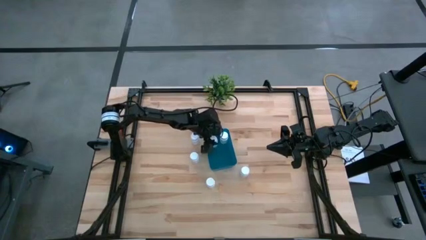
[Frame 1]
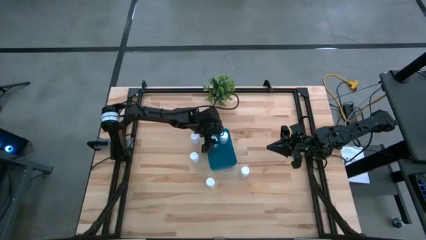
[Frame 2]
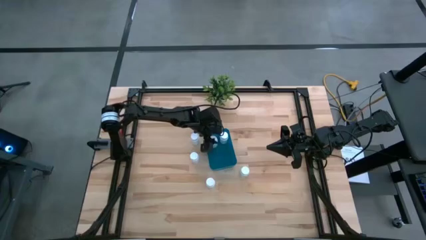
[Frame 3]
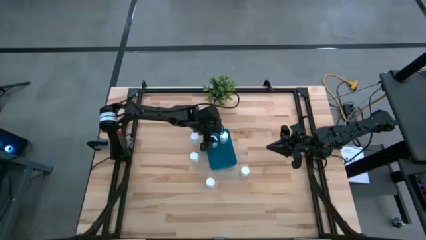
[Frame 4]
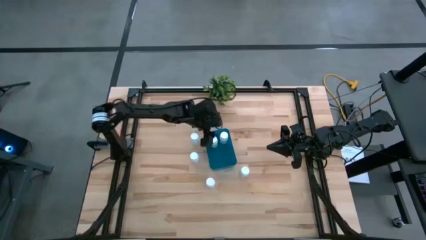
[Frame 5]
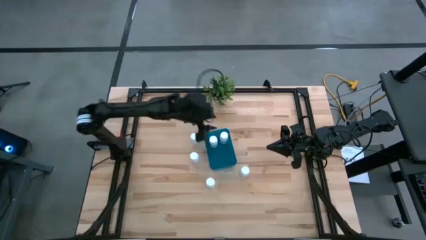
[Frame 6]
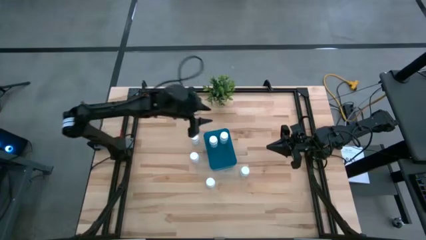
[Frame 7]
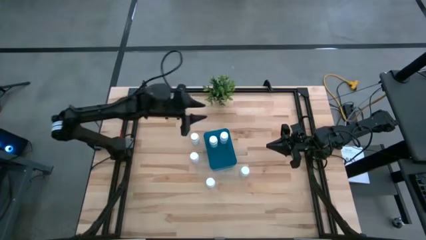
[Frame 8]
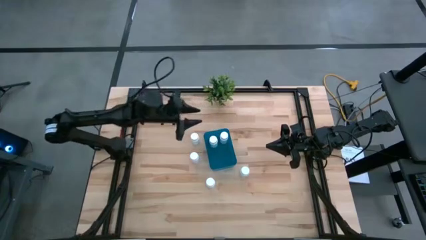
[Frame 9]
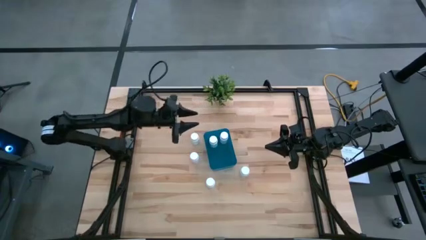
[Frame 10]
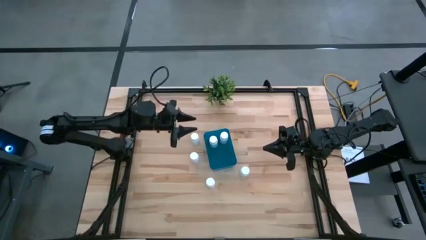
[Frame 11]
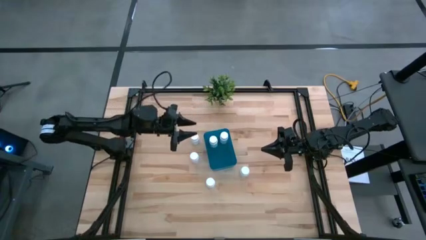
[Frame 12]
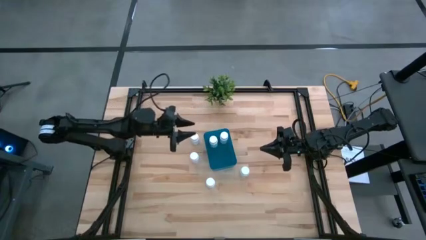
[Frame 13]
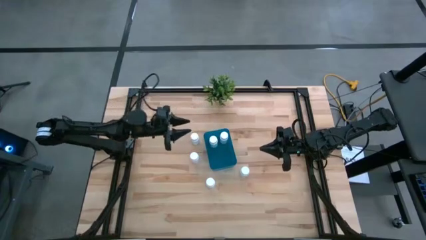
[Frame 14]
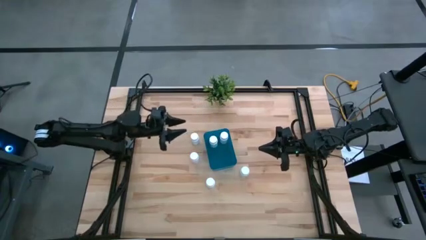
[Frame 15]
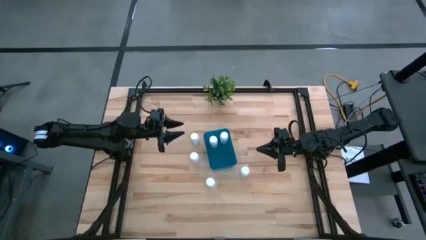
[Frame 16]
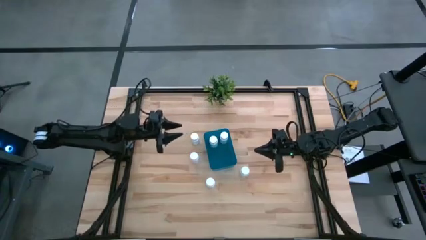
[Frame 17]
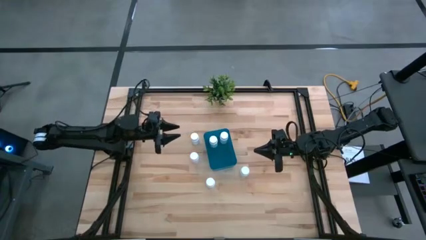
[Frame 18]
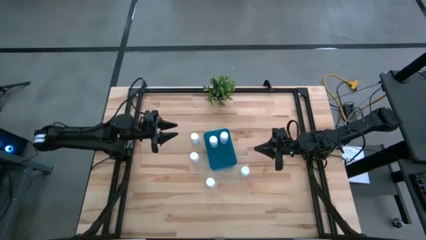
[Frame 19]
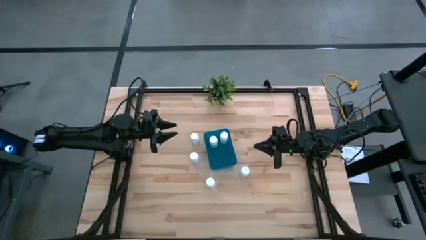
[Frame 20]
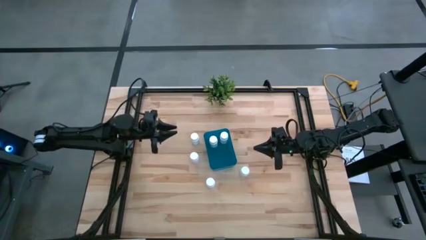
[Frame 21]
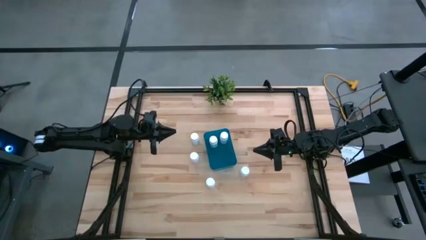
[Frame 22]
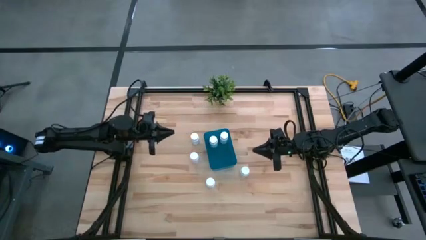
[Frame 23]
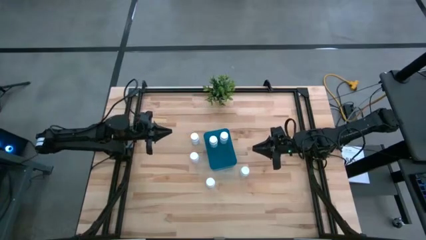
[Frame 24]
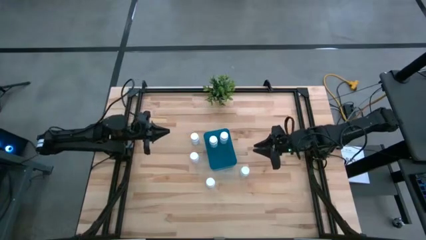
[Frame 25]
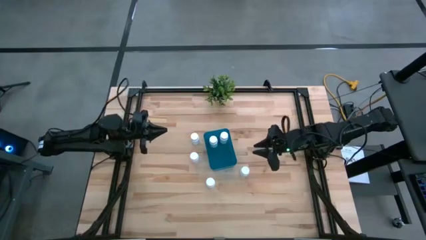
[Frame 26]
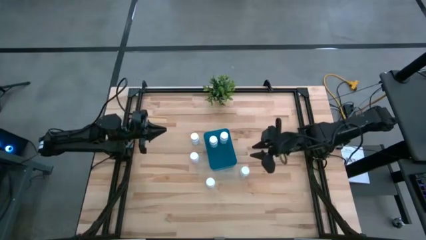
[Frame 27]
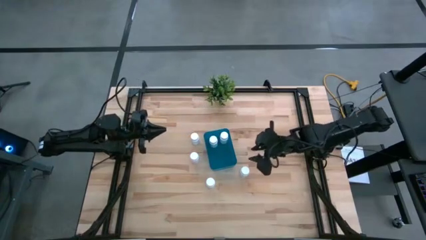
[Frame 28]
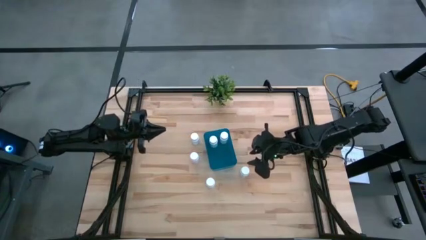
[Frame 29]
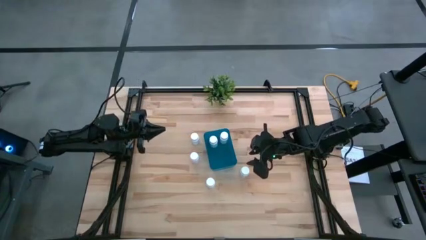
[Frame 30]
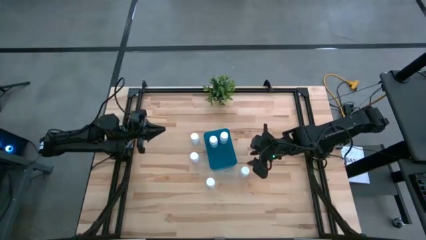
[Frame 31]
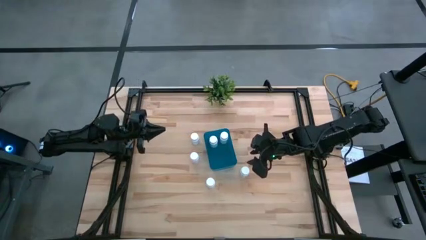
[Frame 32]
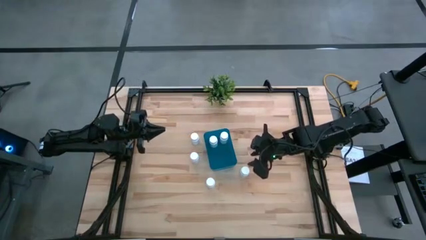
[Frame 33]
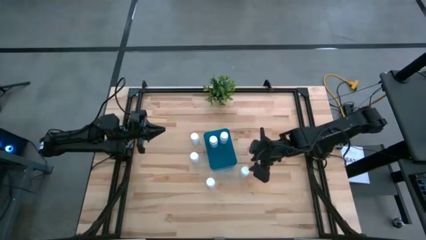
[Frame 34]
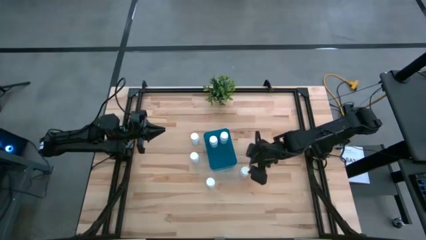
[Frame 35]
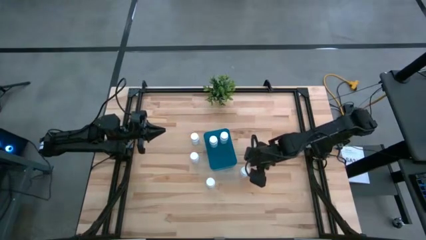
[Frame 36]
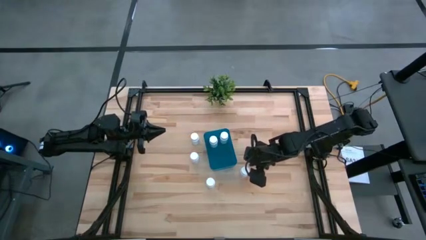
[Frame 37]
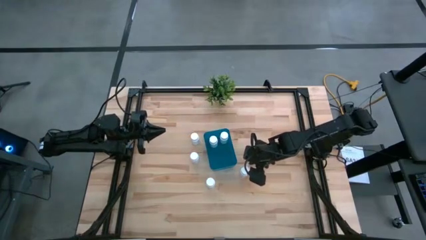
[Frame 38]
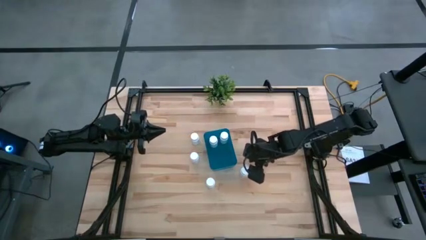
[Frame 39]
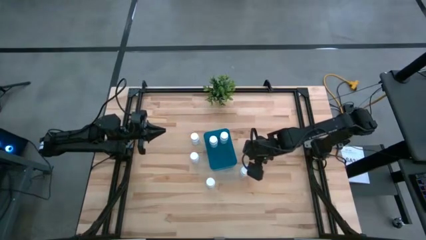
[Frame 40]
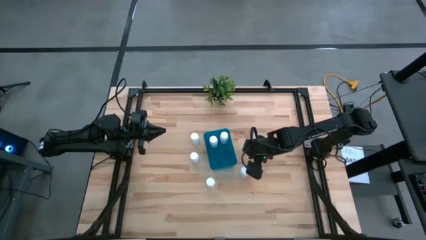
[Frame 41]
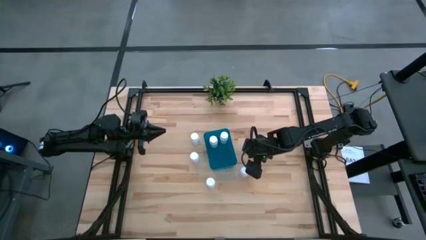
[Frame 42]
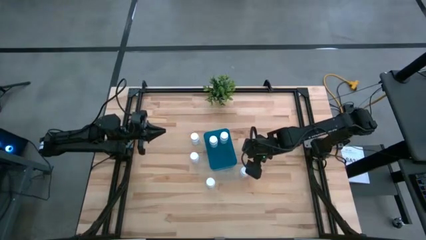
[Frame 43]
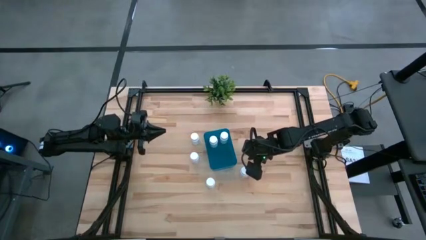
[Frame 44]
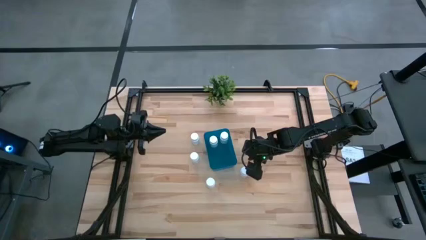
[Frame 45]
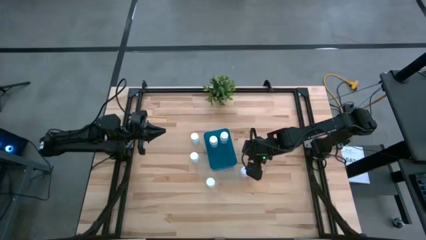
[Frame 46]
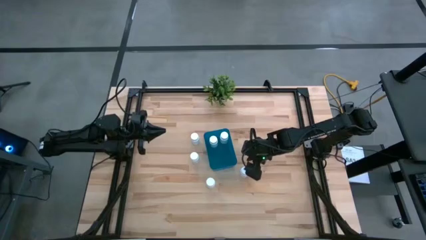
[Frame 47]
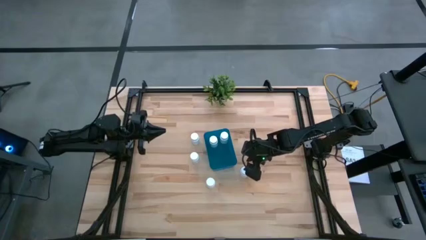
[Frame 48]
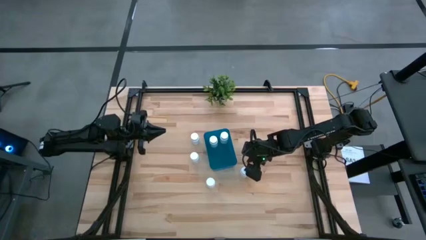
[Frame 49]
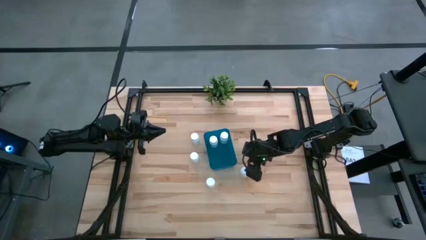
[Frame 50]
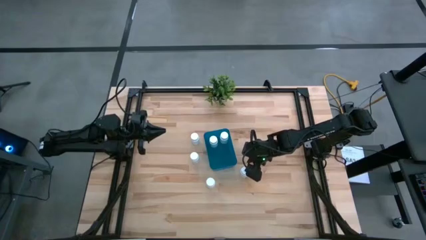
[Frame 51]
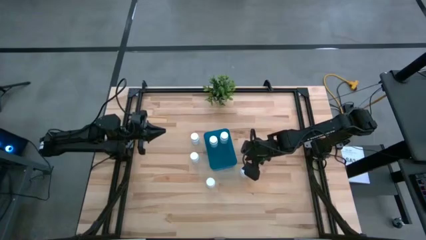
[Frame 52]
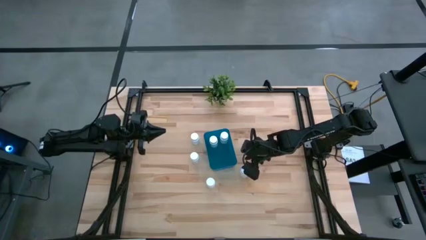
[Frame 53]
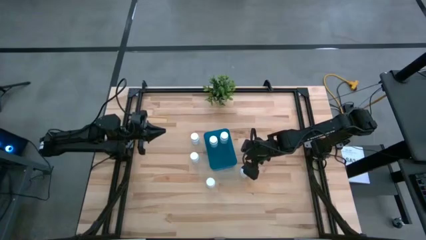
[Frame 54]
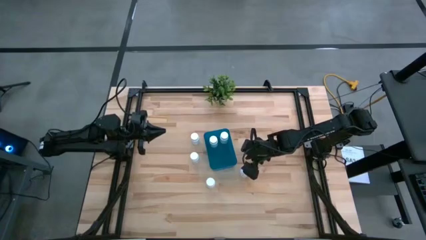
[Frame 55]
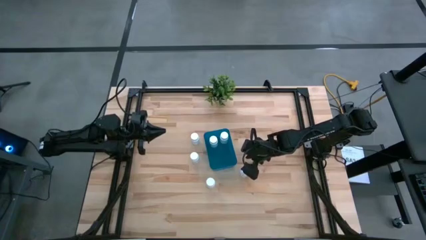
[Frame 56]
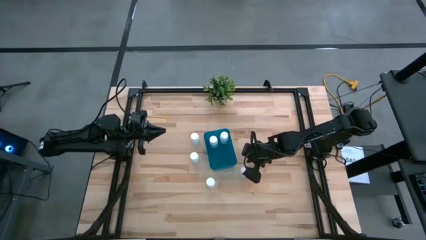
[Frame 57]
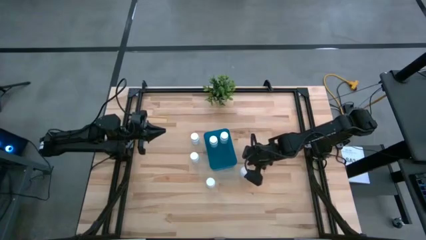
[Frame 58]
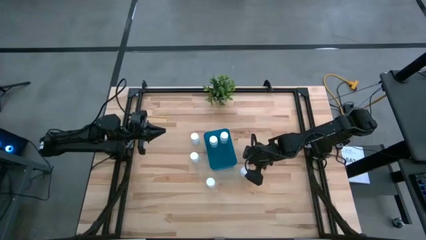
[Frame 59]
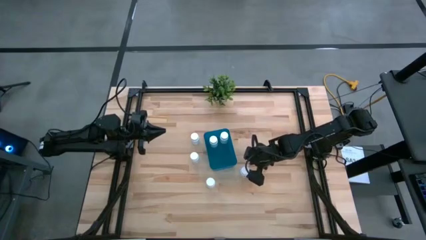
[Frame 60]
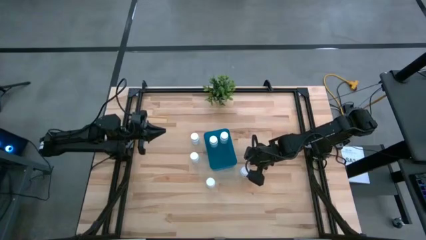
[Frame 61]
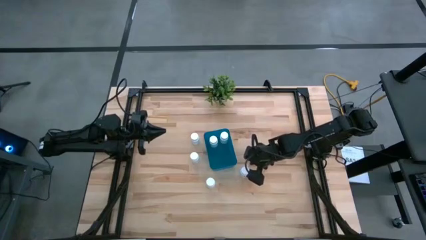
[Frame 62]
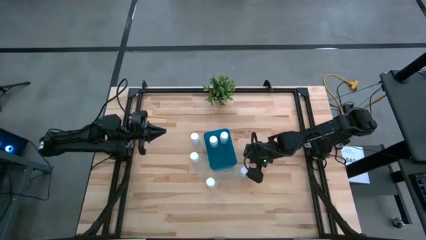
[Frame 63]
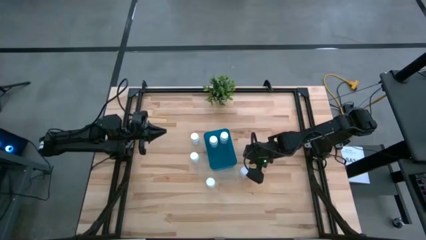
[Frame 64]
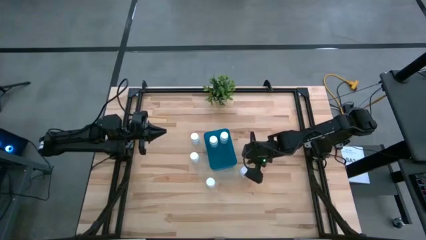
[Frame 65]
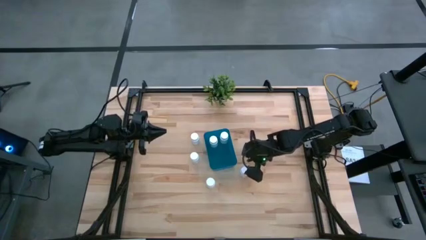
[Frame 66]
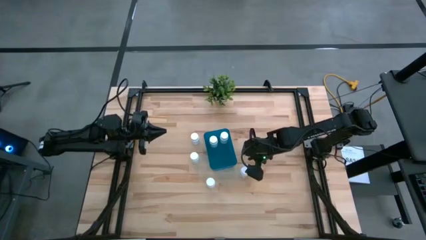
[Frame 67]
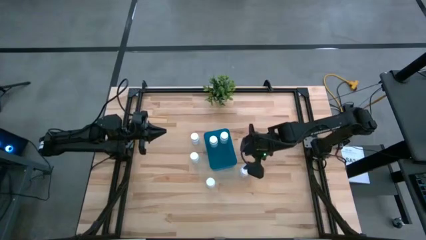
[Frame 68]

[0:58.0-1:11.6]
Task: Pick and place pill bottles into a basket
Put the white medicine bottle into the blue bin
